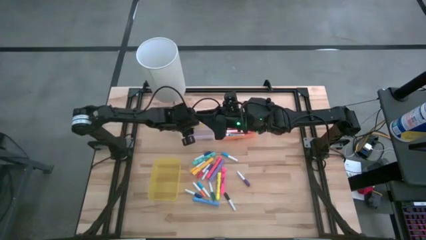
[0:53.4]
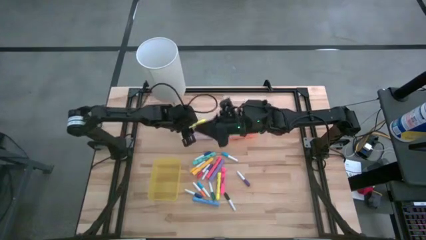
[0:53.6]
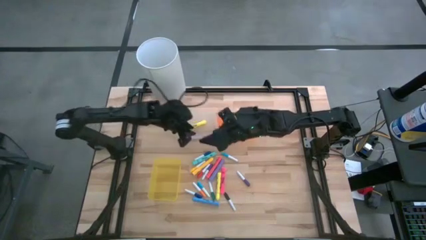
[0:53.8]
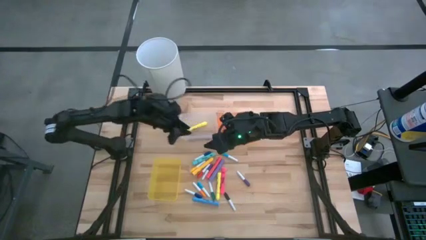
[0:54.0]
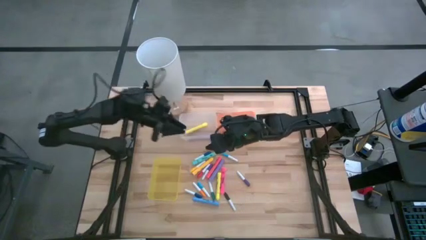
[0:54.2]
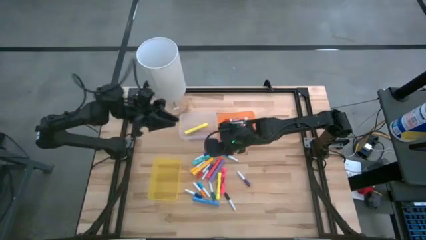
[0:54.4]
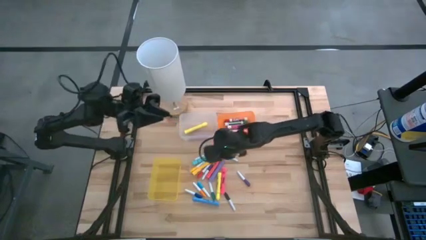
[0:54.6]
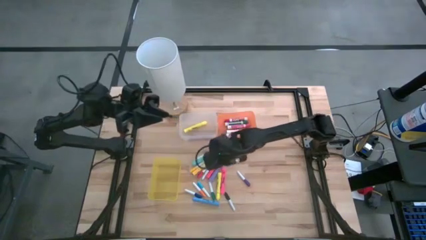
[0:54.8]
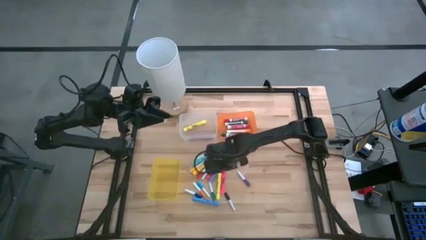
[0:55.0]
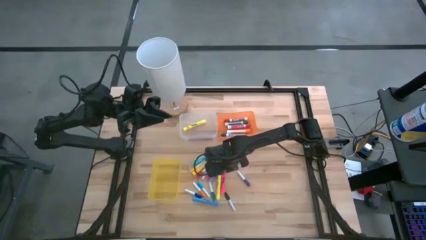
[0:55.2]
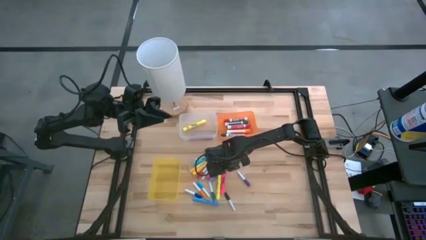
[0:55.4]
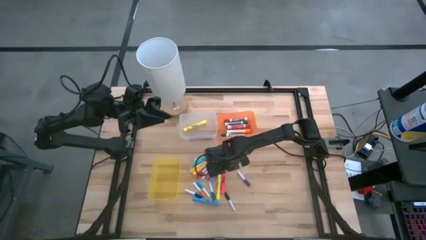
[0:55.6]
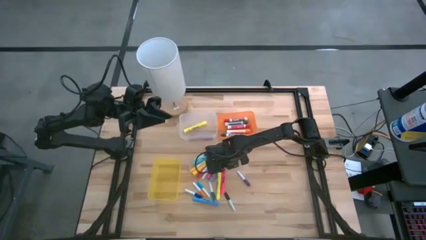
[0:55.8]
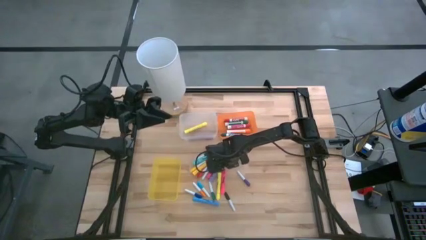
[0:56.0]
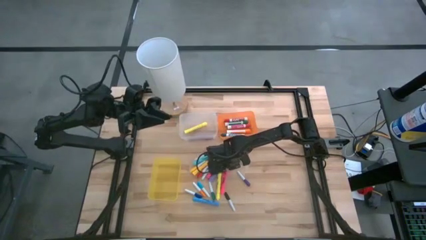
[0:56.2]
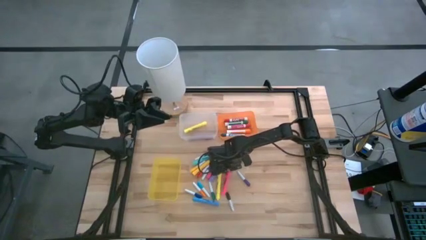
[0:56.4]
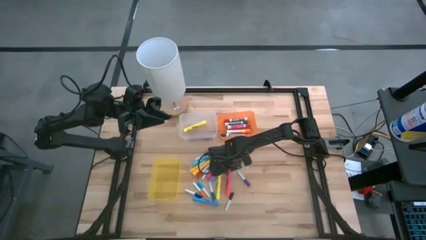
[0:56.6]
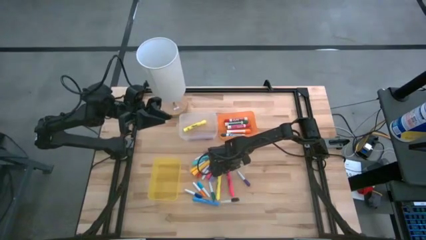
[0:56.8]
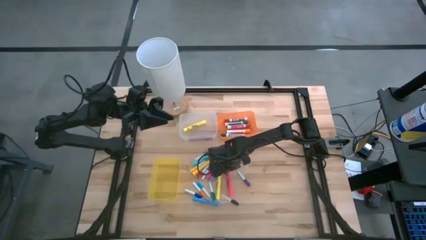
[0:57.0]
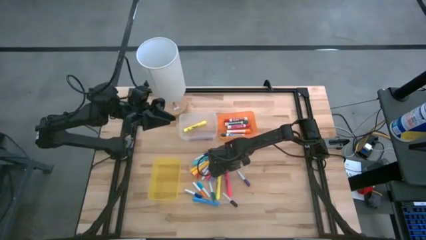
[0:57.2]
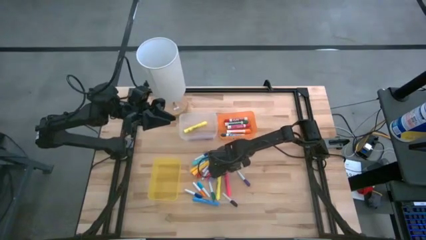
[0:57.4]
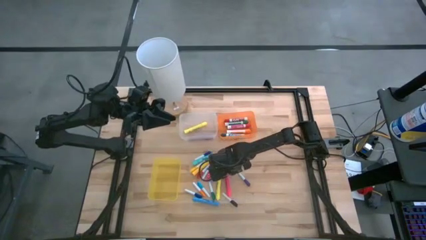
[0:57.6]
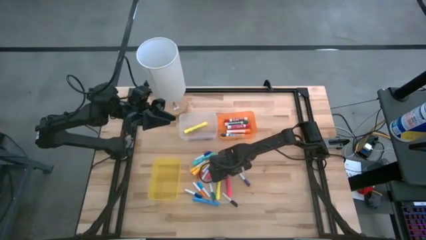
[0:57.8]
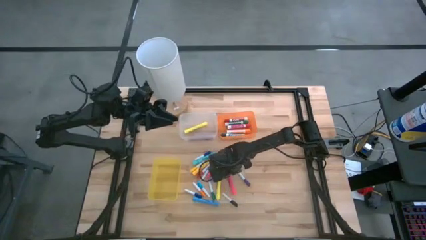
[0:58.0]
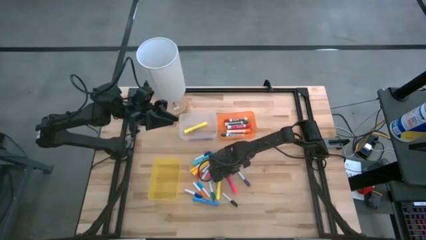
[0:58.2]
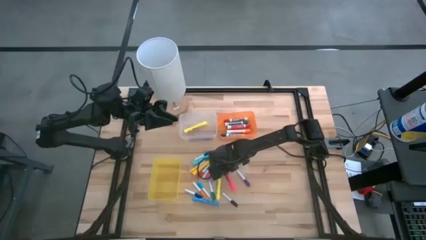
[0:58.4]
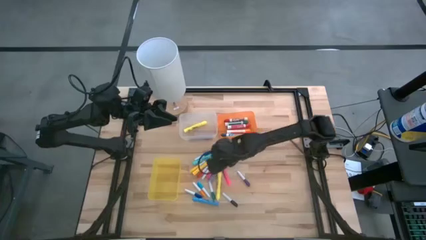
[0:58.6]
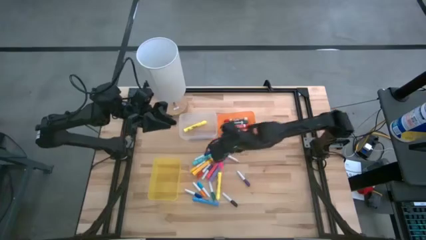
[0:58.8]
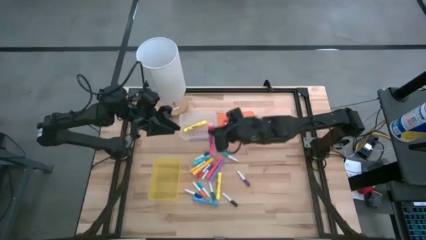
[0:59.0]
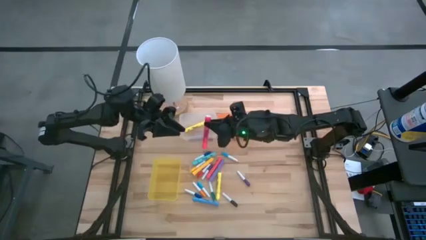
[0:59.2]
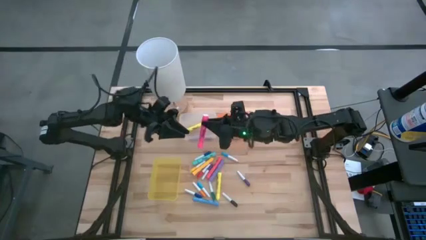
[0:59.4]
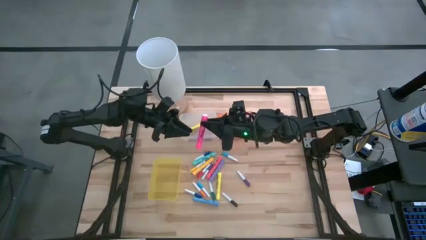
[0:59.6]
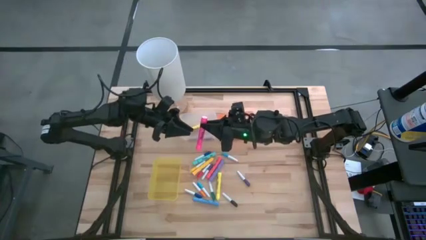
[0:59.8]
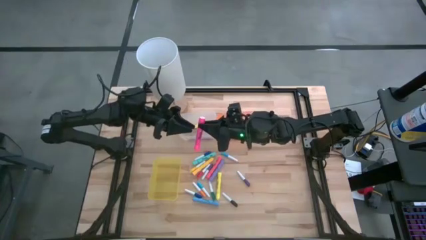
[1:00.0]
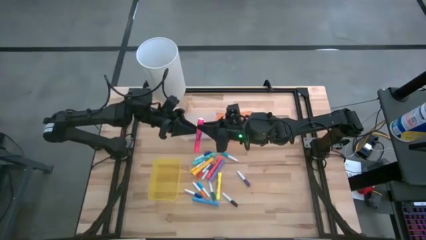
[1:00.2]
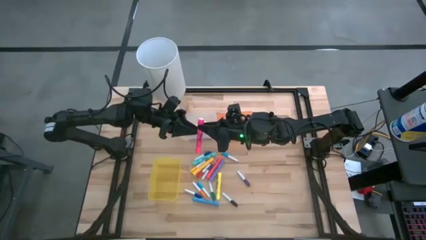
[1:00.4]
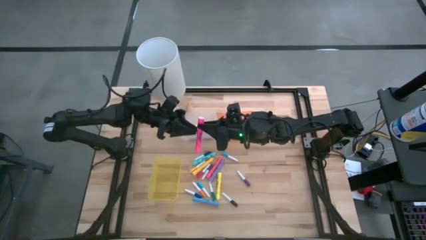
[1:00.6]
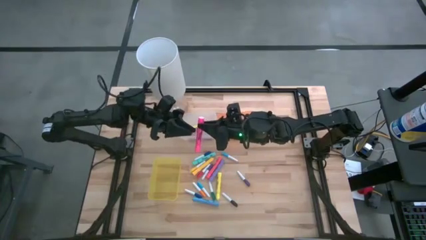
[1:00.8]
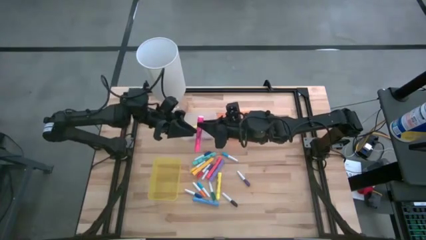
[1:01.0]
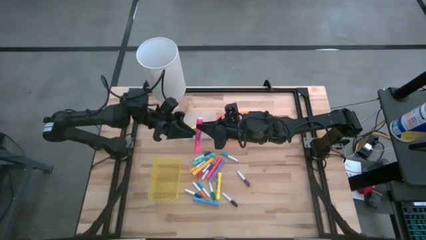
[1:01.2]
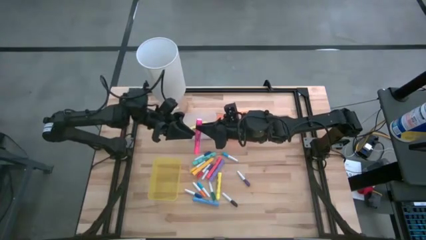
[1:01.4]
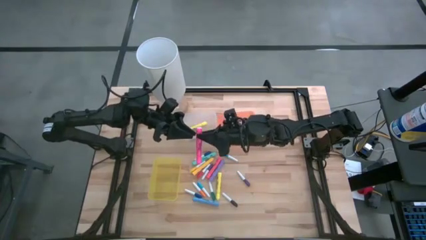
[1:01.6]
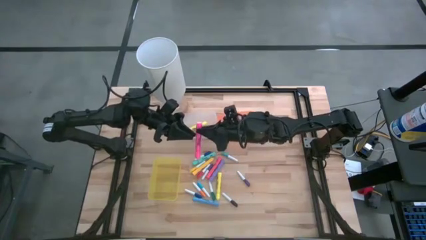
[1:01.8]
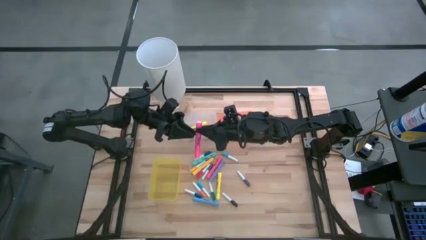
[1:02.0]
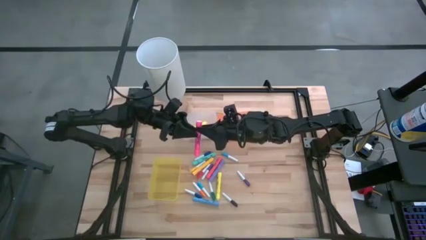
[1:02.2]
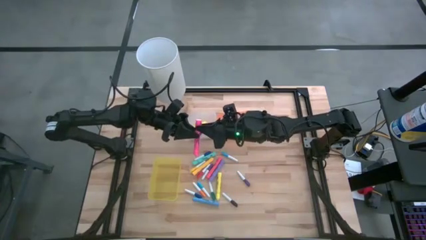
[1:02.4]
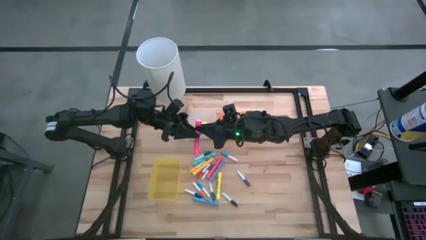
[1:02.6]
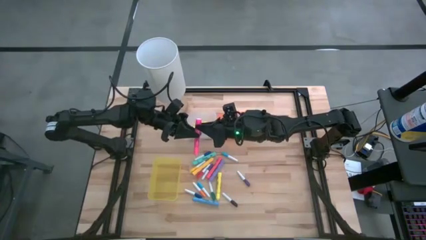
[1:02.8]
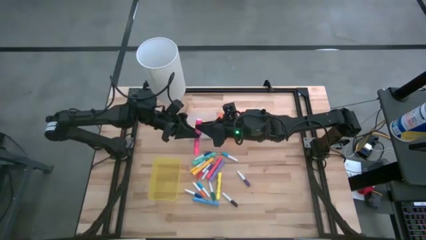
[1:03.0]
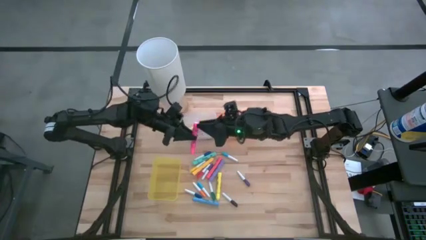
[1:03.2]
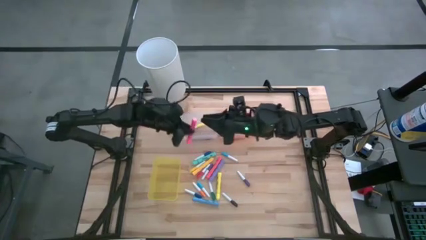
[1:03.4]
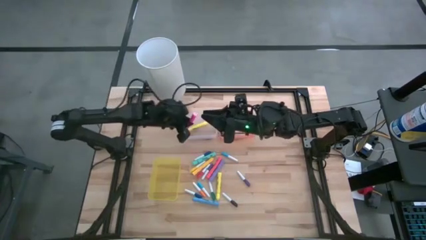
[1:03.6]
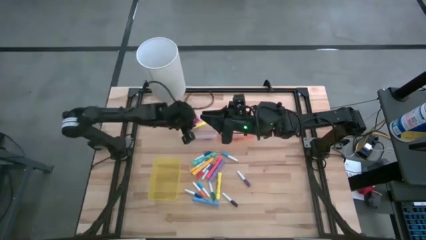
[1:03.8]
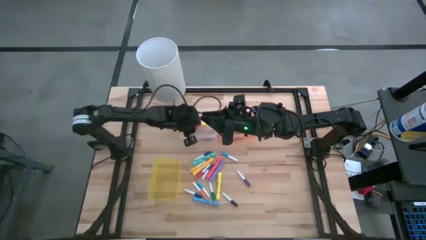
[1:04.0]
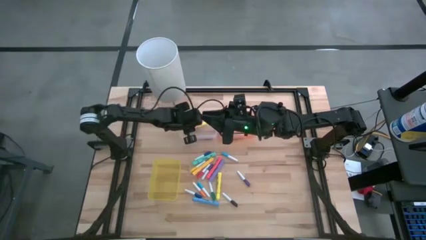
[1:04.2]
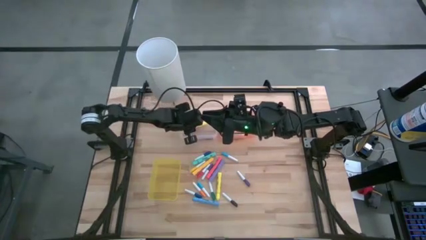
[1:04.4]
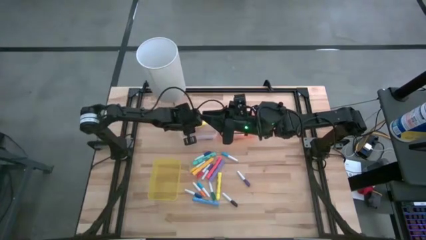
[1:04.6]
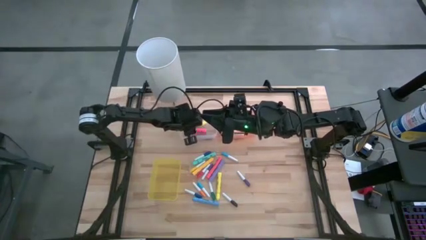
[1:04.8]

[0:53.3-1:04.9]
Task: Pick & Place Markers
Put the bottom pink highlighter into the transparent bin

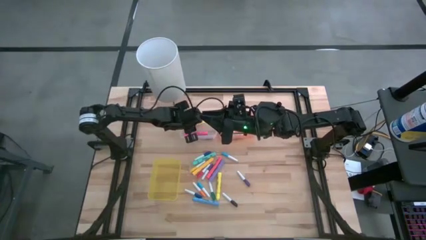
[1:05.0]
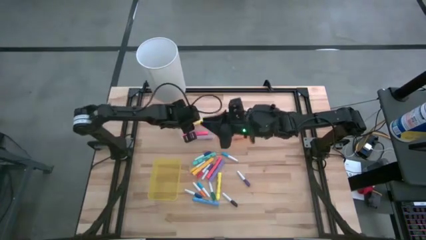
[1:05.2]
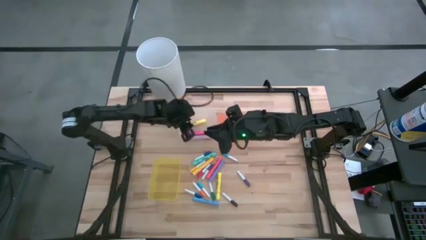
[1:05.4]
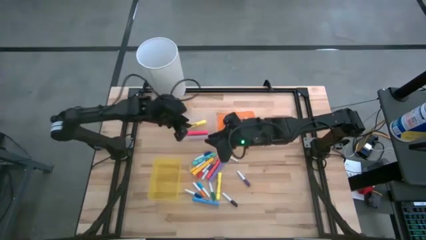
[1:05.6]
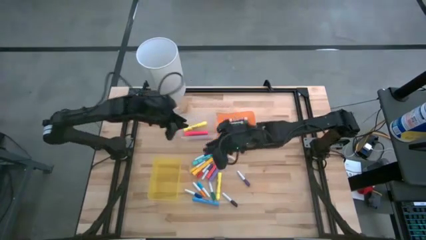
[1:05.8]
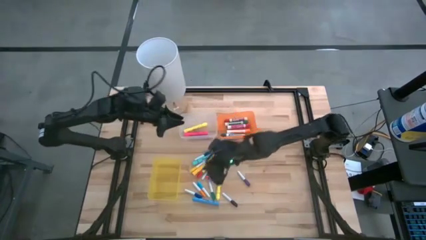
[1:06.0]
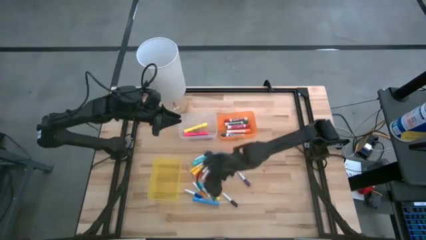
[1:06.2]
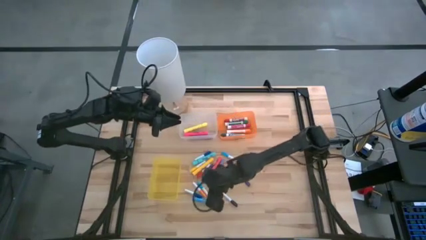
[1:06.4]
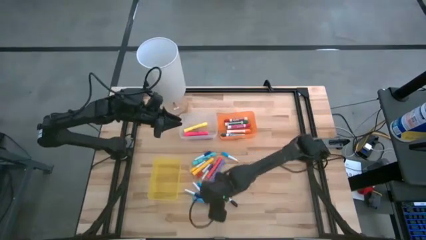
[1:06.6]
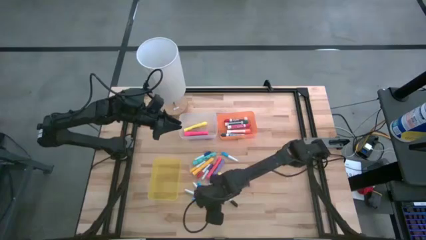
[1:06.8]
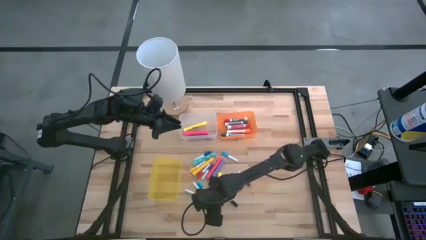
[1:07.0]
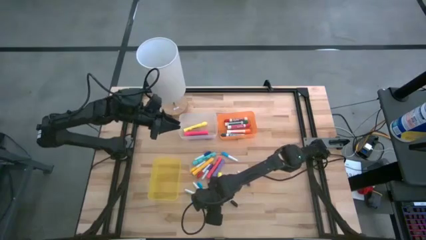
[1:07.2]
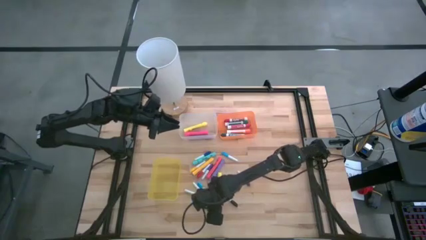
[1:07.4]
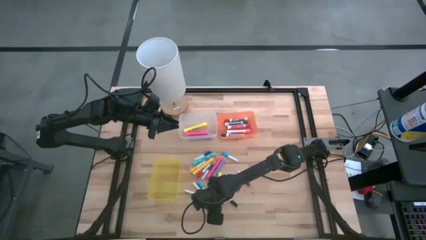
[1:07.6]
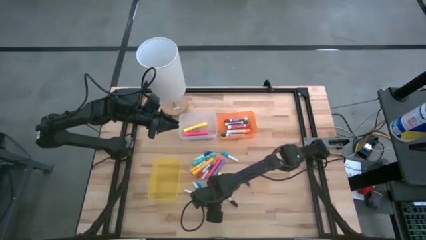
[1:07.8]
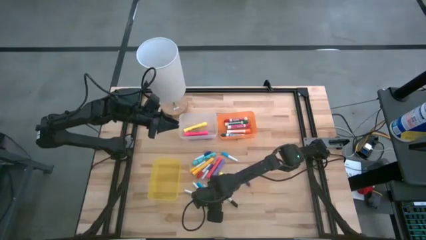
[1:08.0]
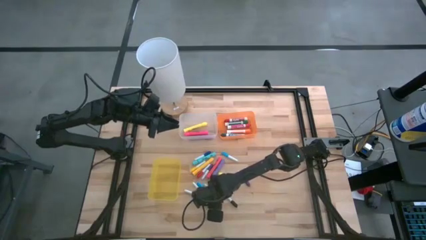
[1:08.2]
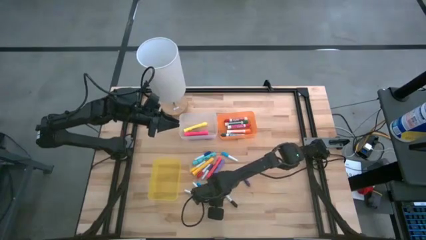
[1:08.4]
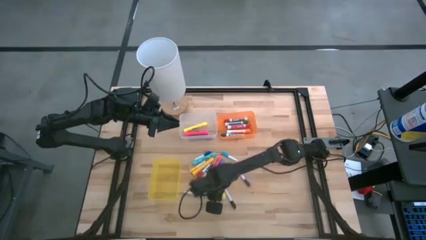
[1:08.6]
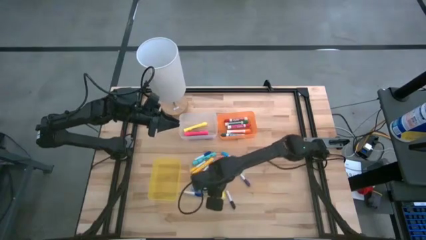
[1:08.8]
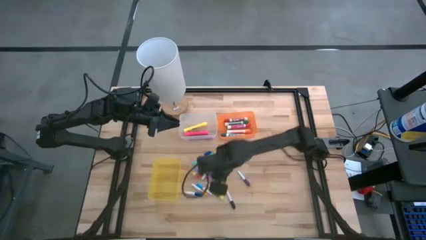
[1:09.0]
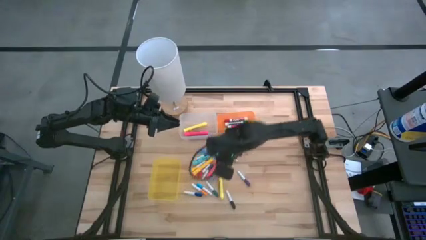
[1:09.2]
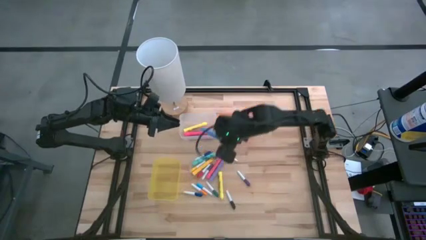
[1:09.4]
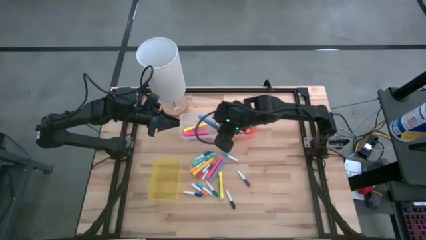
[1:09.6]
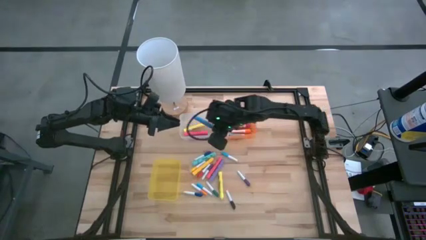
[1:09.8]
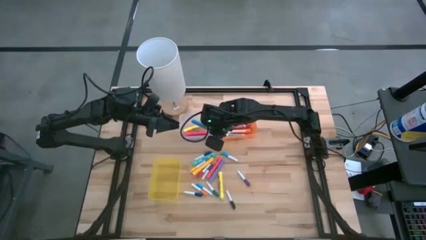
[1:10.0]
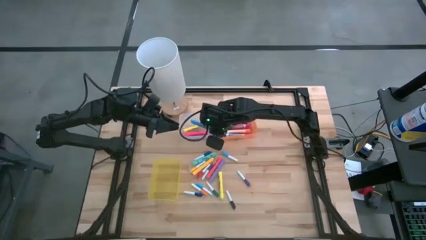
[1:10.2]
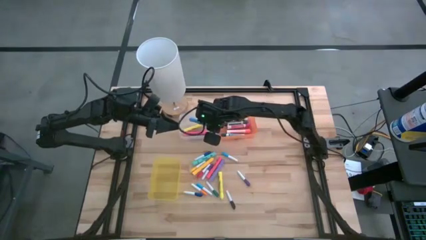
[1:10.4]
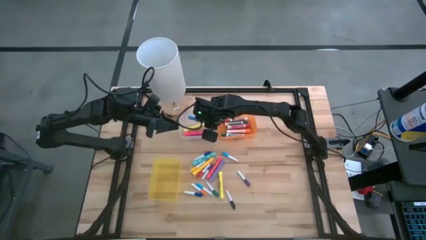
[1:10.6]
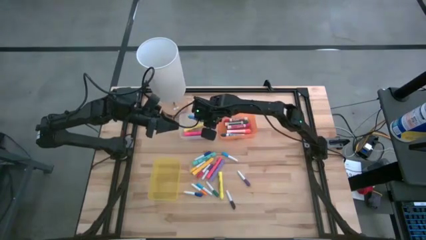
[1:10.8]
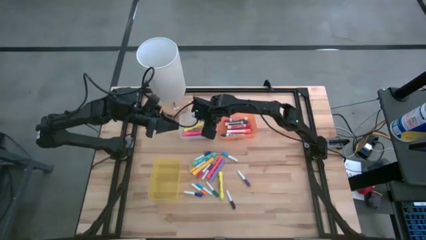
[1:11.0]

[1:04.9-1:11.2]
Put the blue highlighter into the transparent bin
